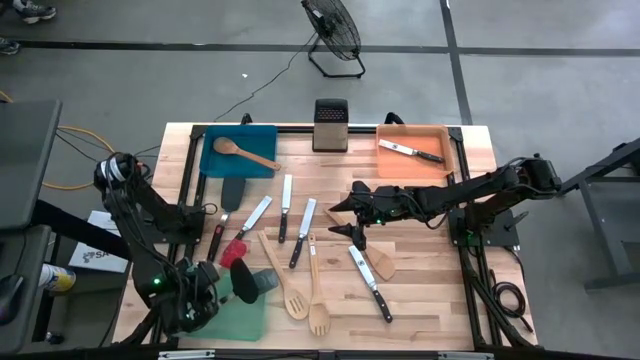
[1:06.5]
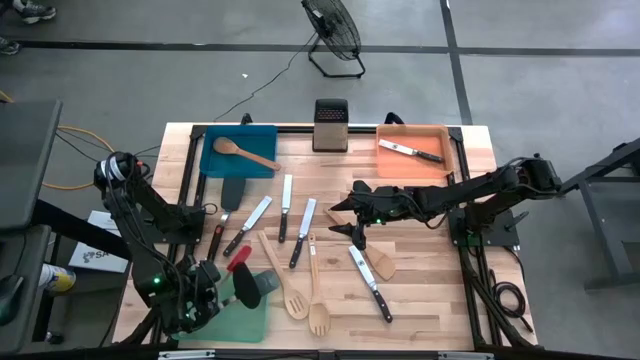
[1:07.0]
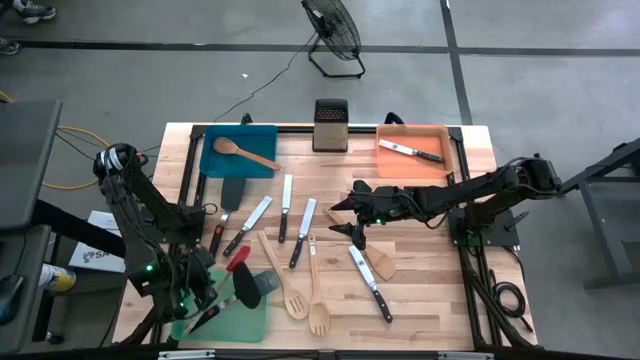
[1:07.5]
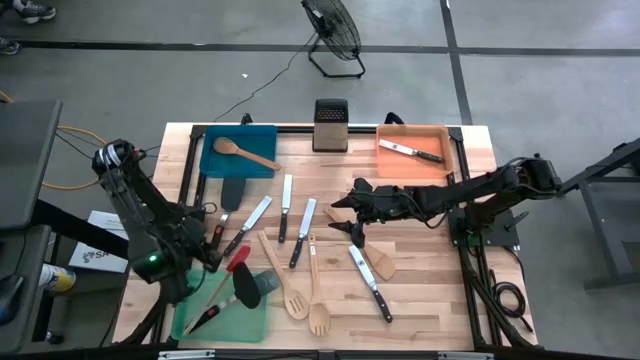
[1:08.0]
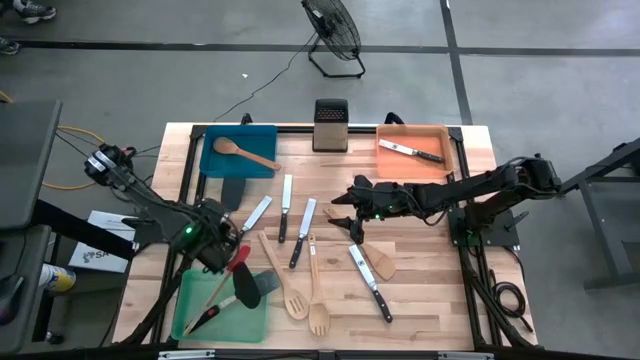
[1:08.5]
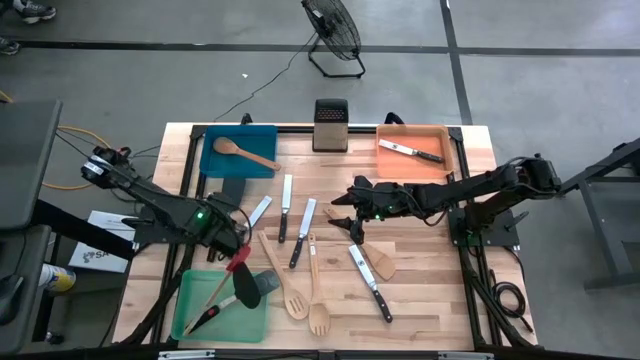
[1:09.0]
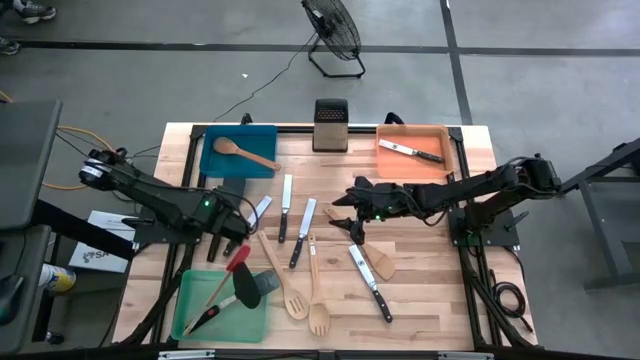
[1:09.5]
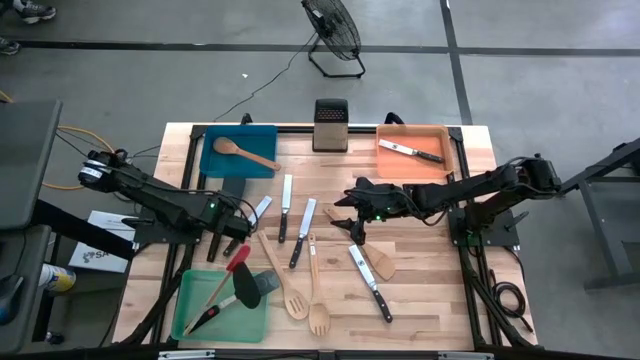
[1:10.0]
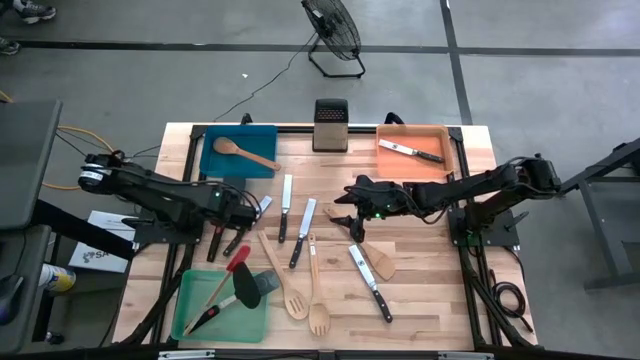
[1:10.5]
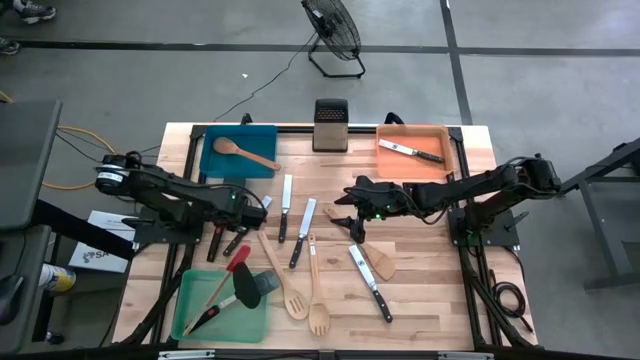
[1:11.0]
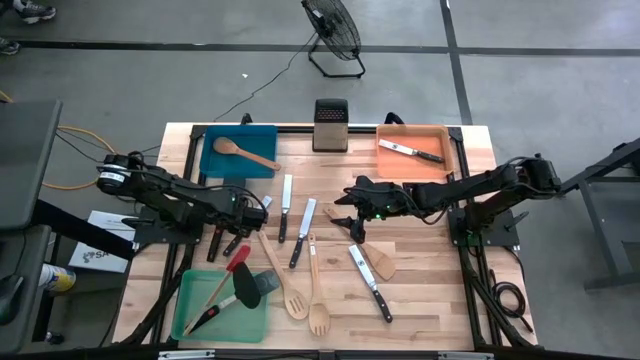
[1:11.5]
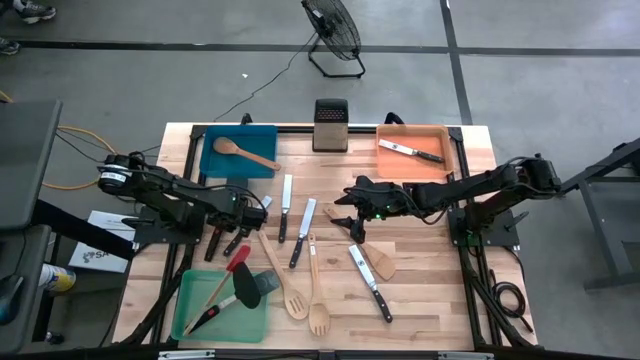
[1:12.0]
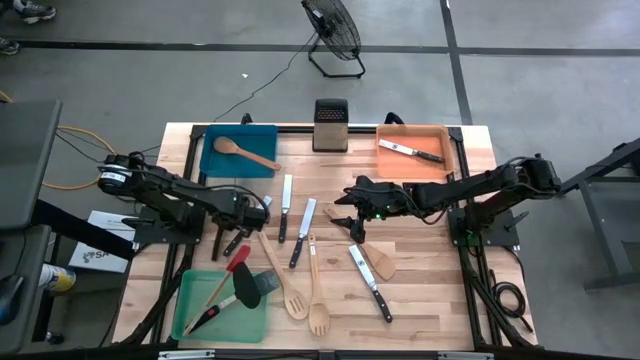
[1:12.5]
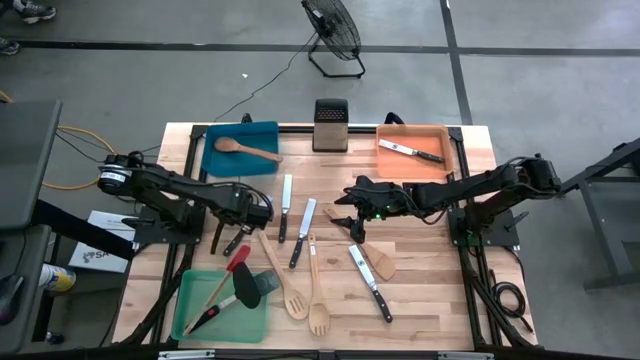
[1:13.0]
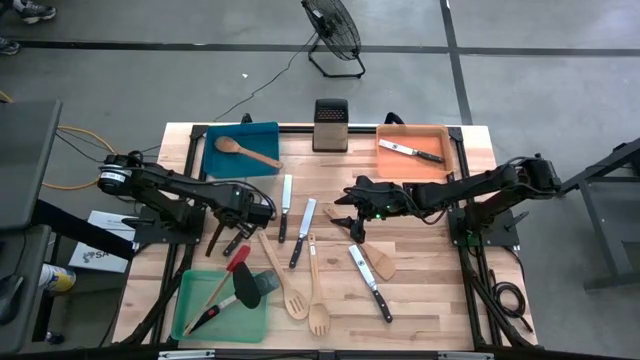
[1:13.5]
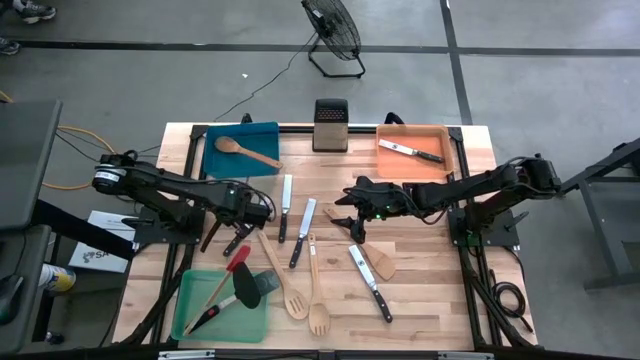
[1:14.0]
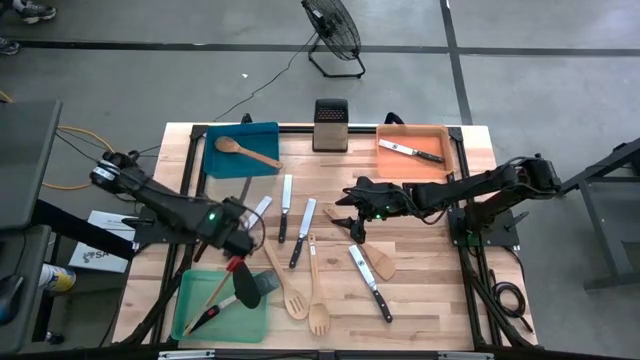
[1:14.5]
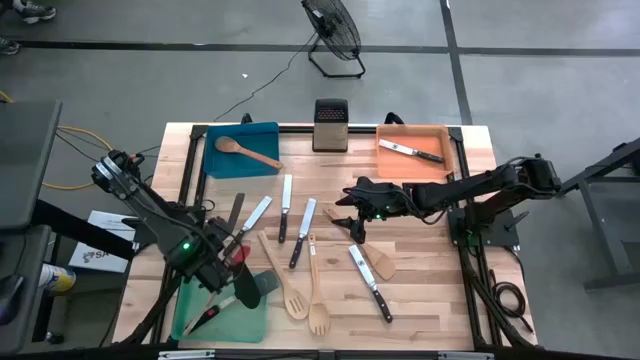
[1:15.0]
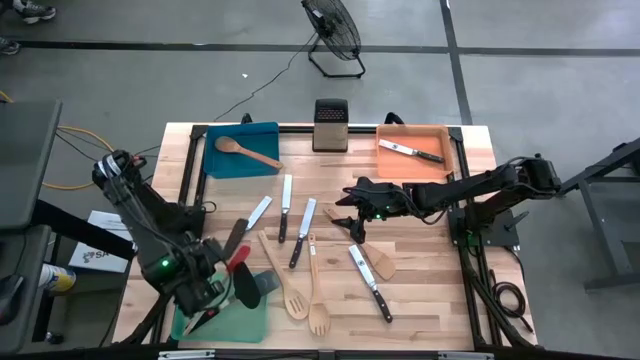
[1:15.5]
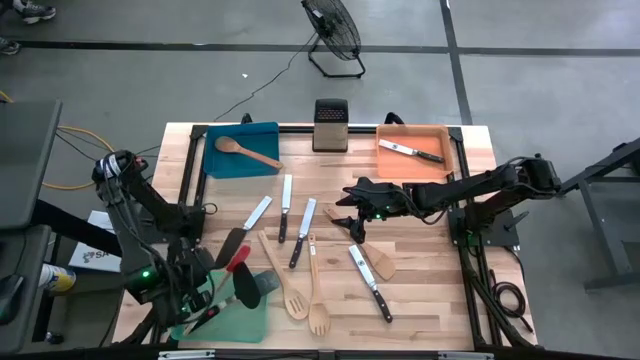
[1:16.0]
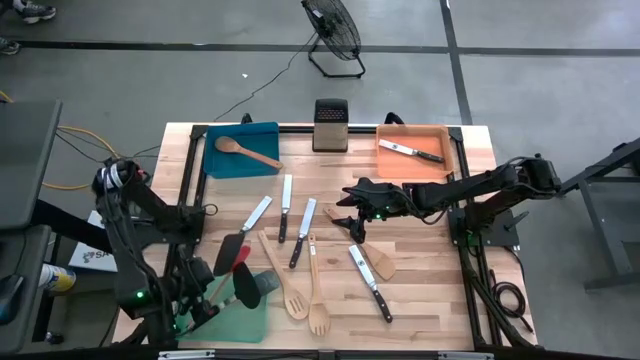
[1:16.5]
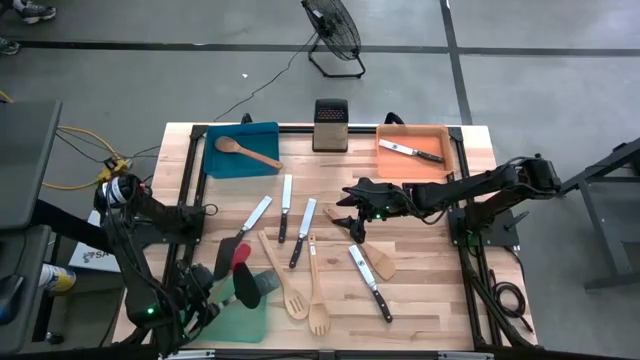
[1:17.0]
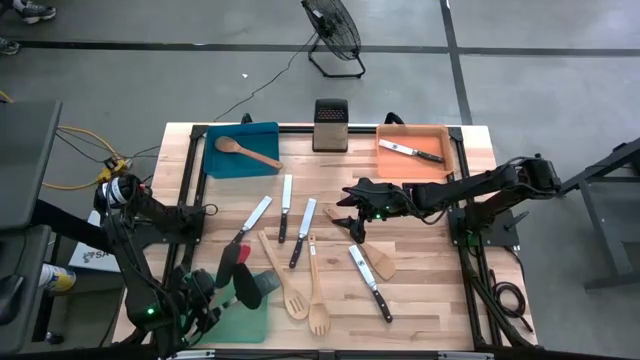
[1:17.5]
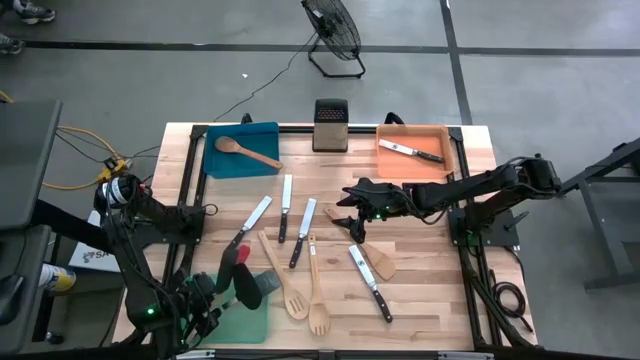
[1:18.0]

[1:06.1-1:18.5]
Task: Pick & Place Kitchen Items
Put the black flipper into the green bin

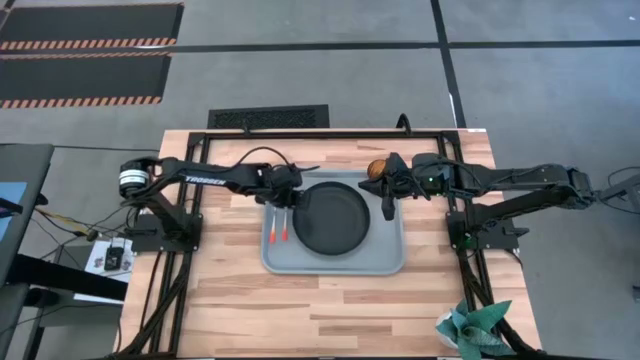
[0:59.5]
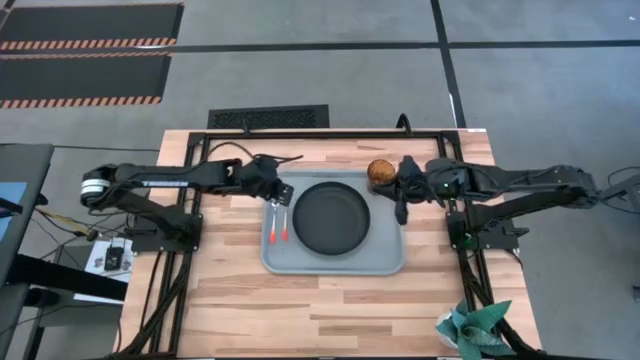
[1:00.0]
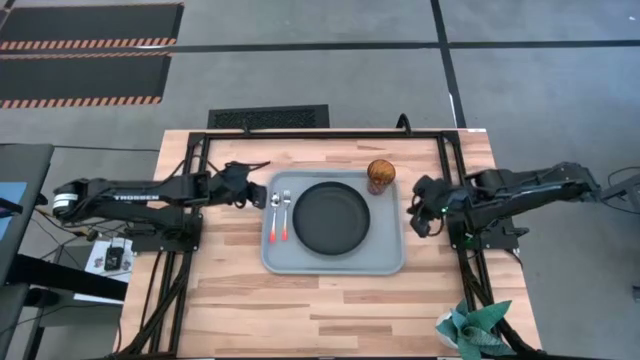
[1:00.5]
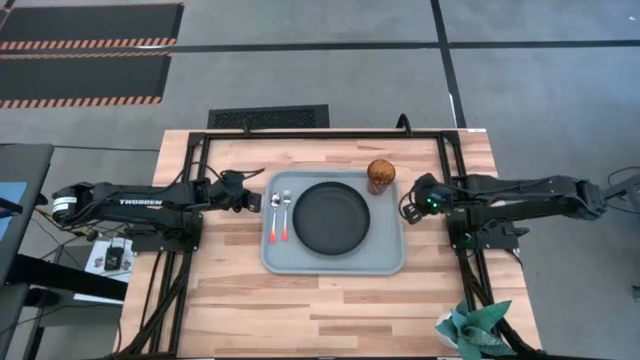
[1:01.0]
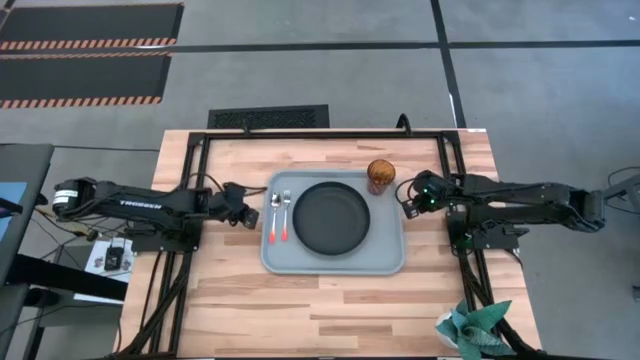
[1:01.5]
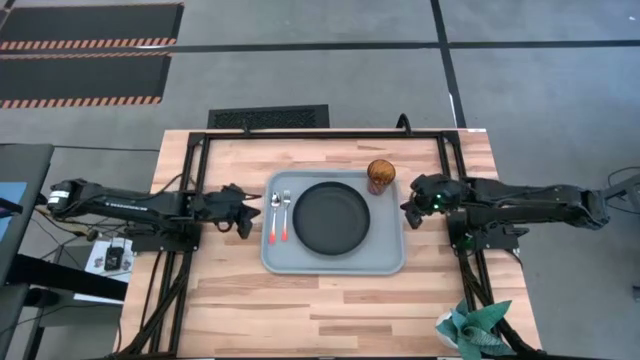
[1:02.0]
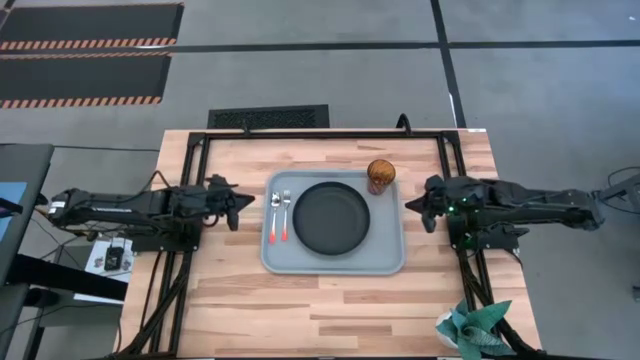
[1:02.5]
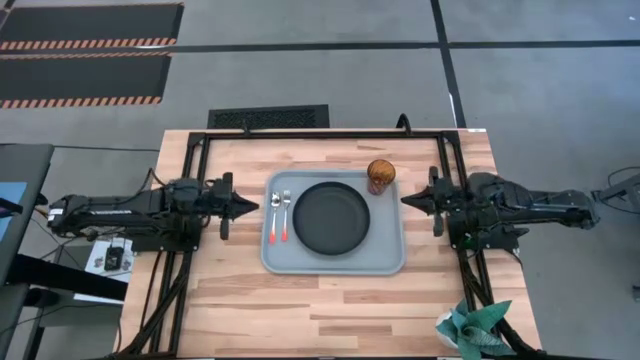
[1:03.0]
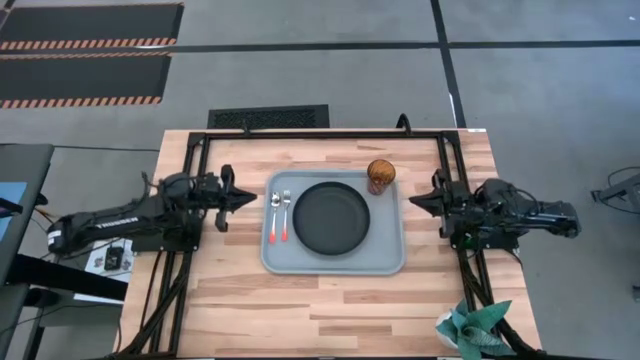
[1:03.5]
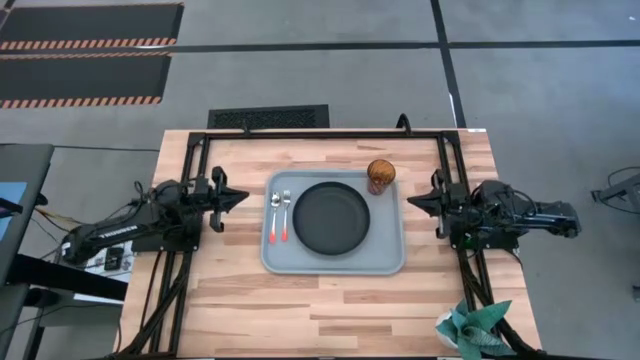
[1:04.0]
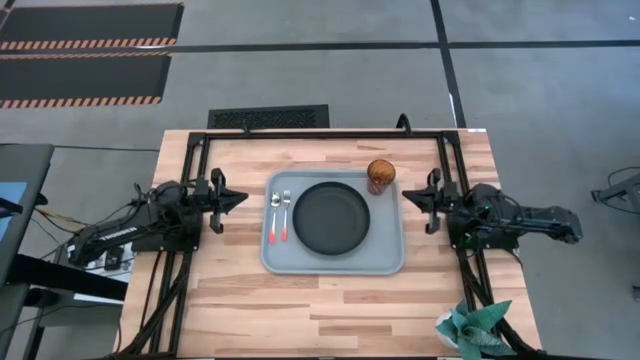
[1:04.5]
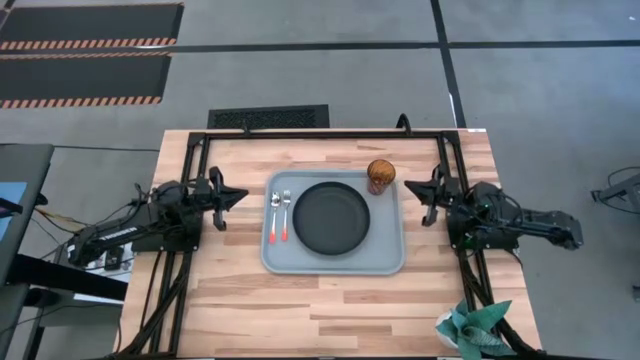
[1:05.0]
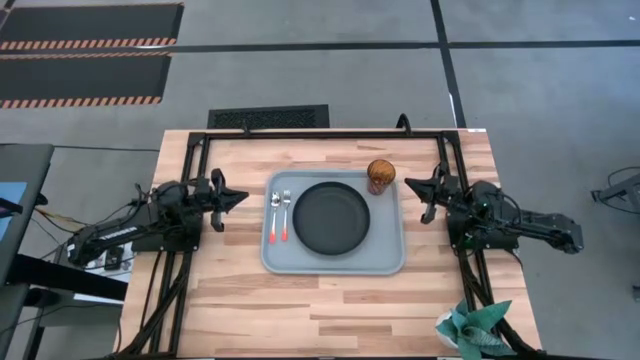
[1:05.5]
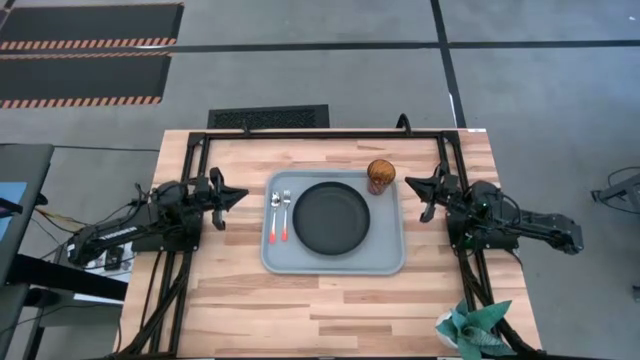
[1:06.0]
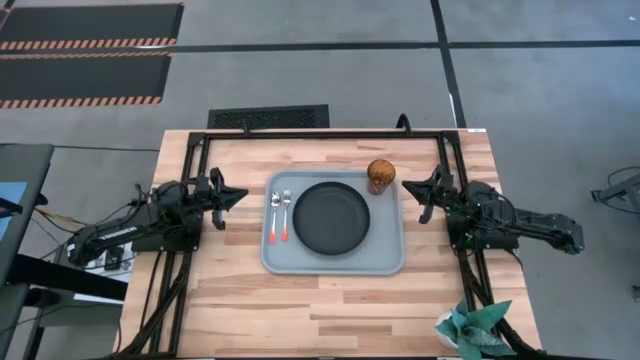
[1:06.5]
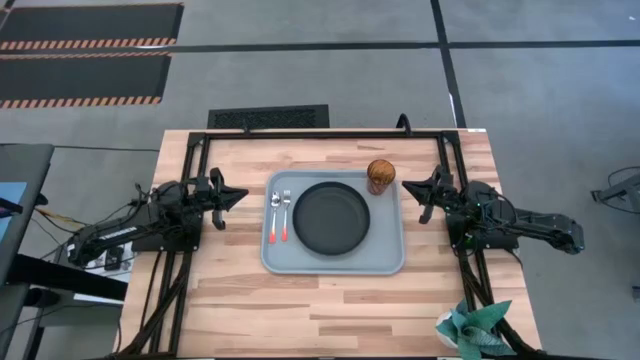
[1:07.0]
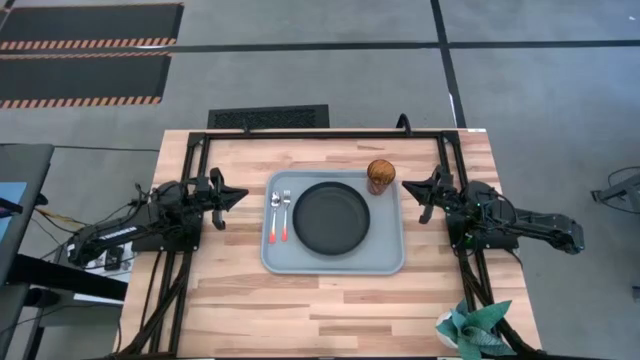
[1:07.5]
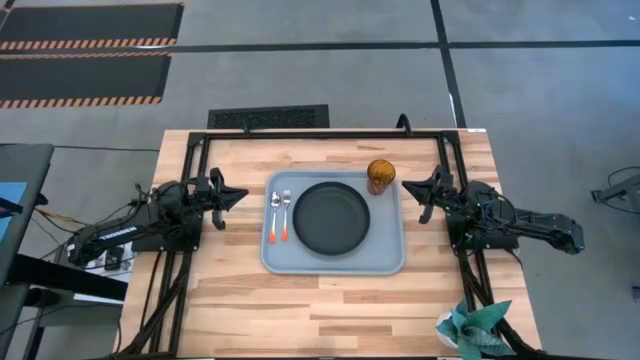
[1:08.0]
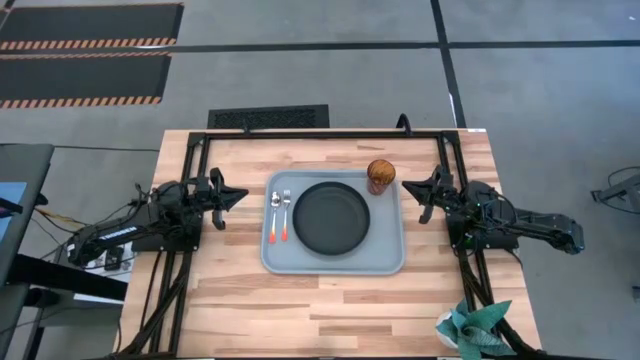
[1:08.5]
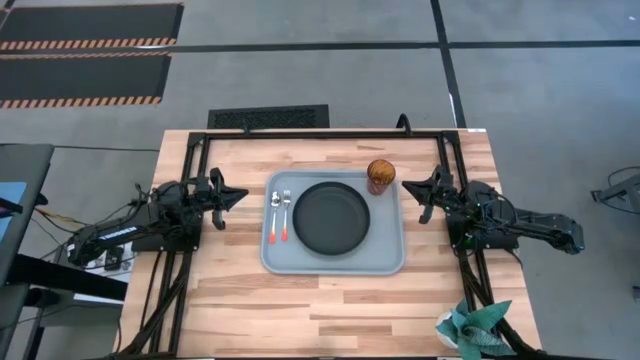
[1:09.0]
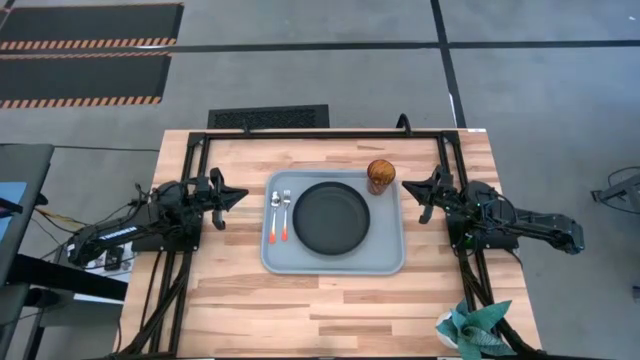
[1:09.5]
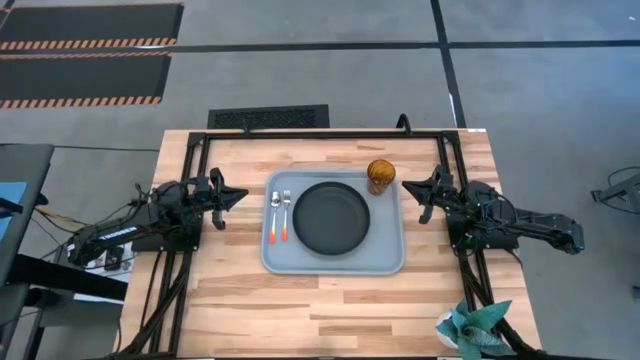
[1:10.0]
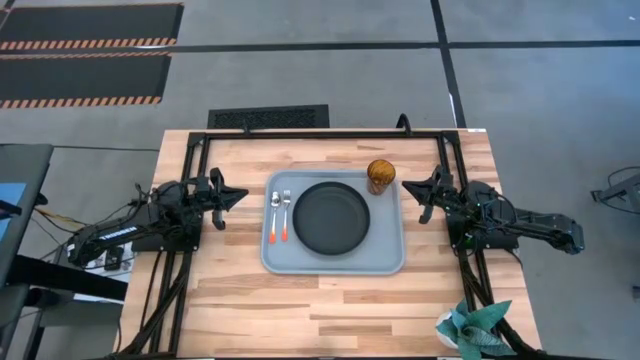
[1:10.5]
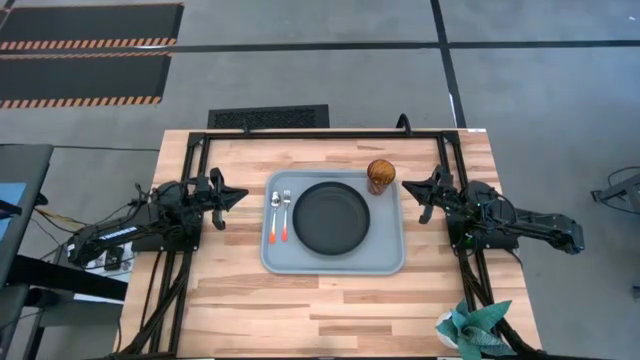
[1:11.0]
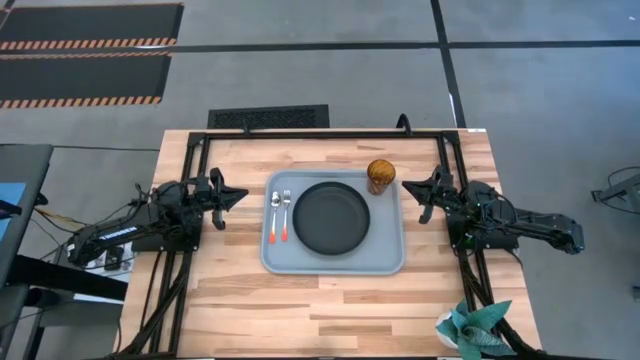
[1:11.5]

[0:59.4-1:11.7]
Task: Pick and place plate/cup/fork/spoon on tray
Return to Home Position
